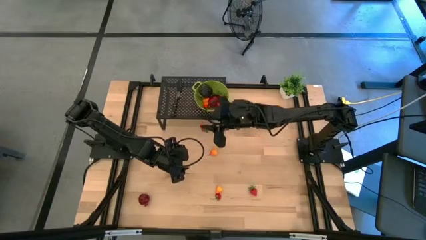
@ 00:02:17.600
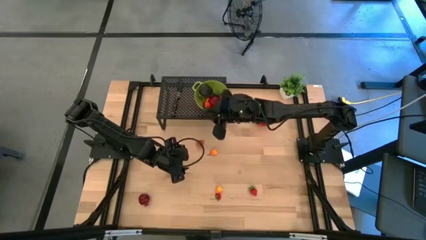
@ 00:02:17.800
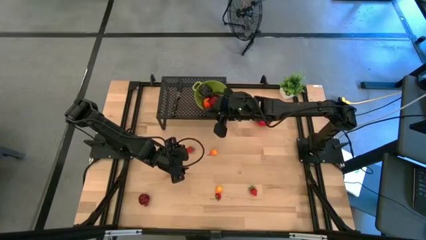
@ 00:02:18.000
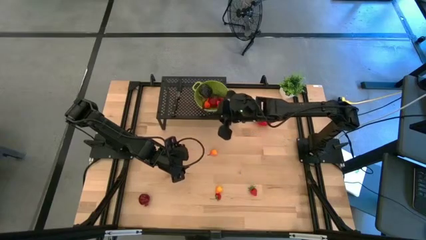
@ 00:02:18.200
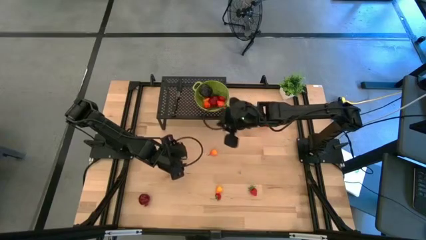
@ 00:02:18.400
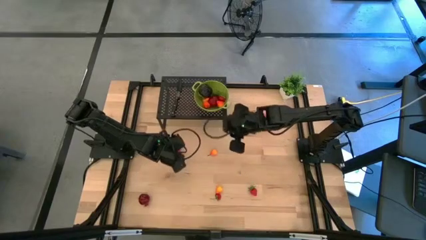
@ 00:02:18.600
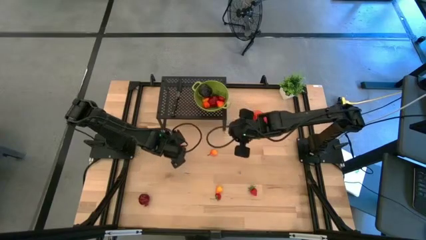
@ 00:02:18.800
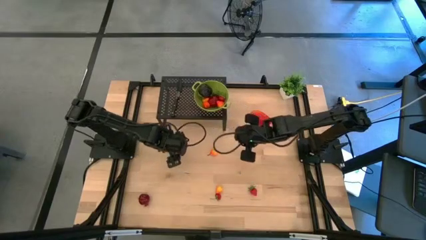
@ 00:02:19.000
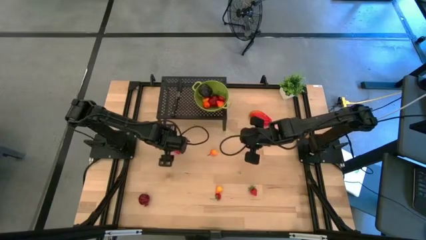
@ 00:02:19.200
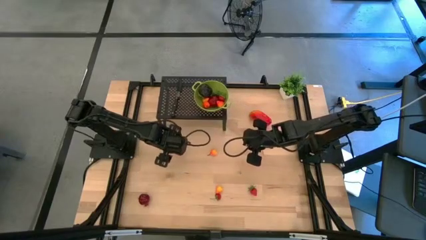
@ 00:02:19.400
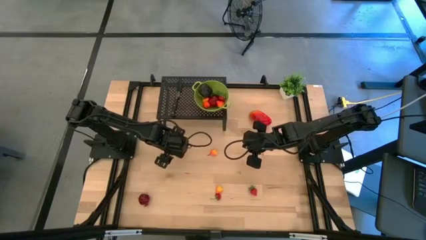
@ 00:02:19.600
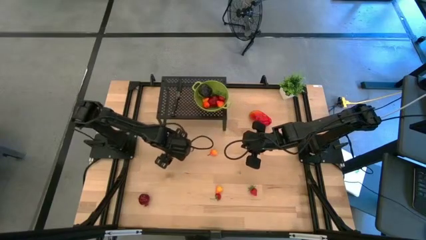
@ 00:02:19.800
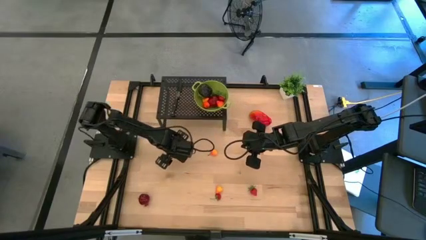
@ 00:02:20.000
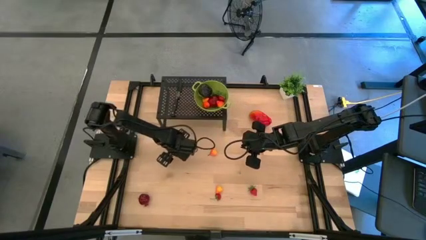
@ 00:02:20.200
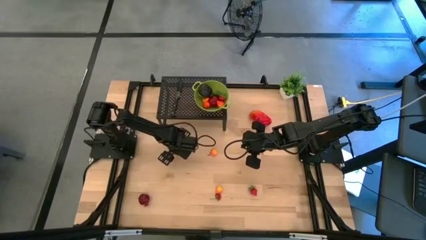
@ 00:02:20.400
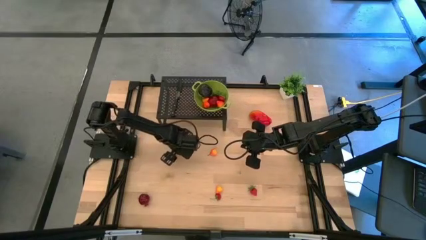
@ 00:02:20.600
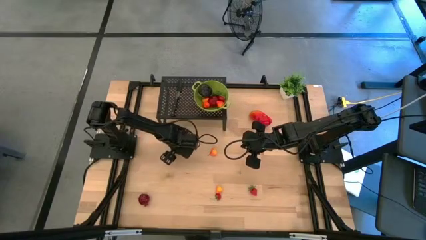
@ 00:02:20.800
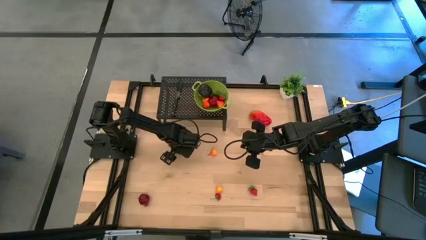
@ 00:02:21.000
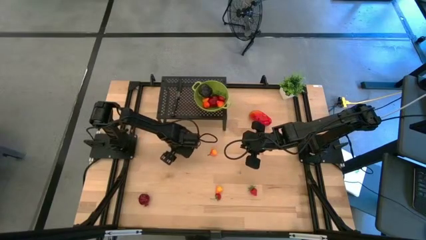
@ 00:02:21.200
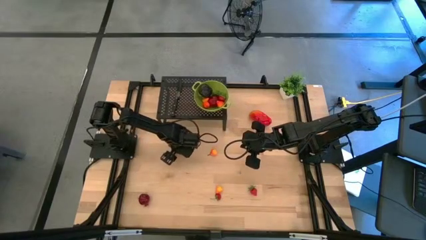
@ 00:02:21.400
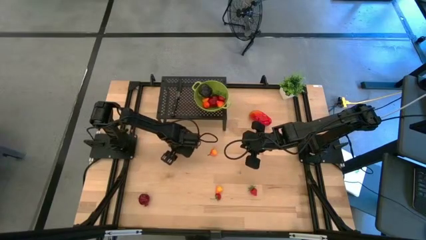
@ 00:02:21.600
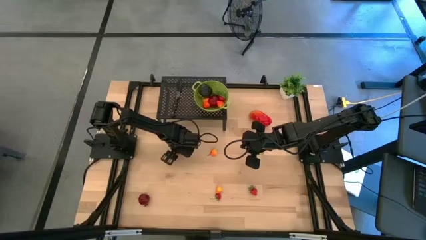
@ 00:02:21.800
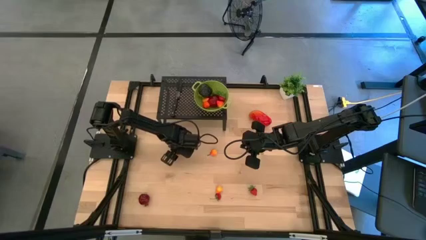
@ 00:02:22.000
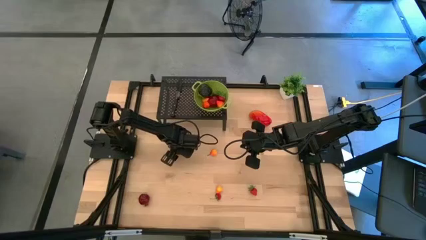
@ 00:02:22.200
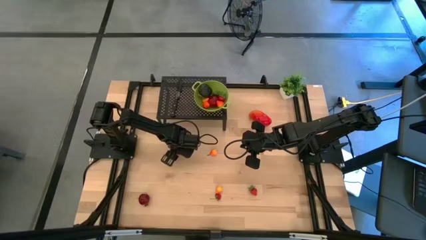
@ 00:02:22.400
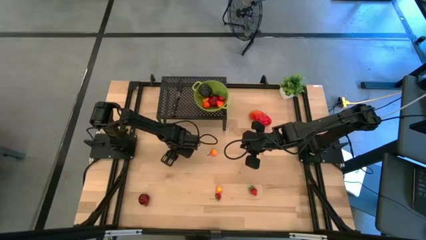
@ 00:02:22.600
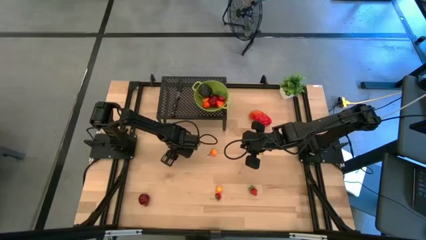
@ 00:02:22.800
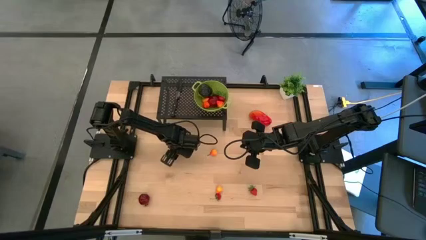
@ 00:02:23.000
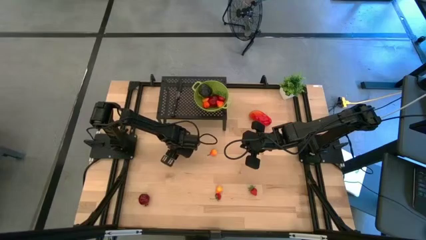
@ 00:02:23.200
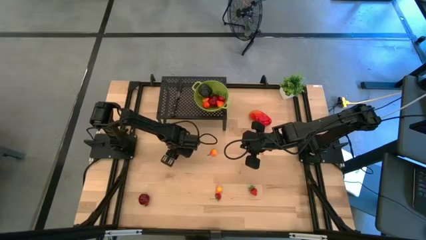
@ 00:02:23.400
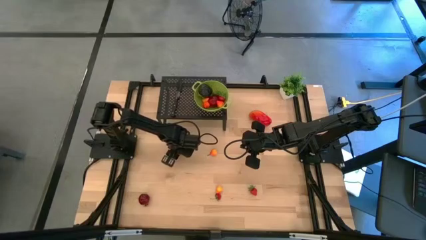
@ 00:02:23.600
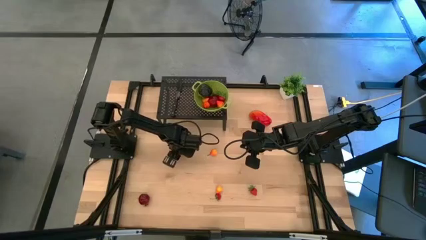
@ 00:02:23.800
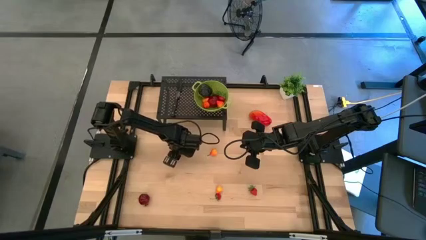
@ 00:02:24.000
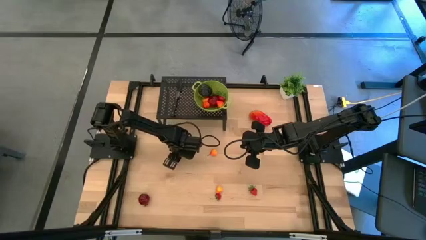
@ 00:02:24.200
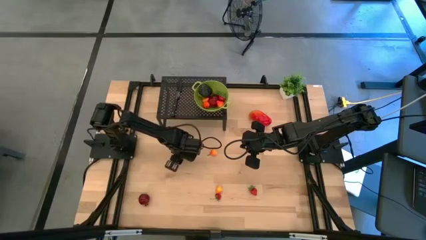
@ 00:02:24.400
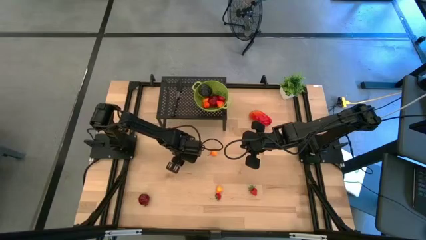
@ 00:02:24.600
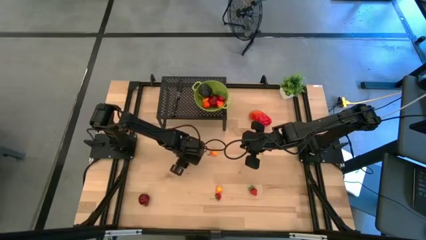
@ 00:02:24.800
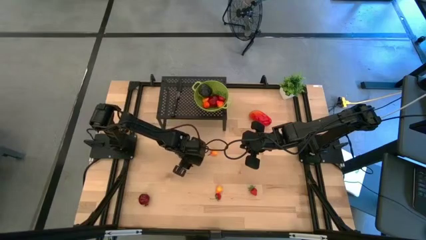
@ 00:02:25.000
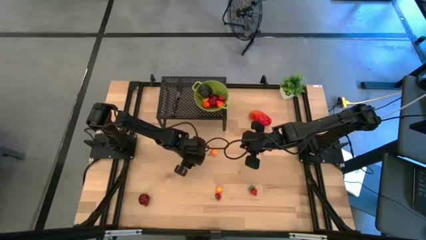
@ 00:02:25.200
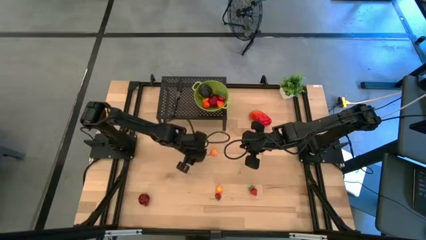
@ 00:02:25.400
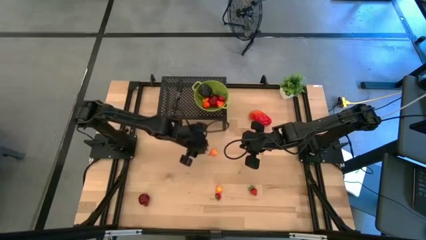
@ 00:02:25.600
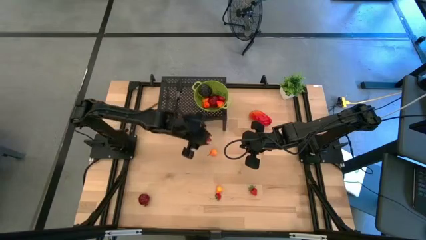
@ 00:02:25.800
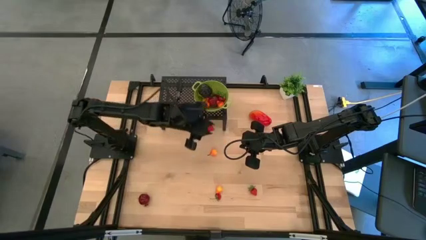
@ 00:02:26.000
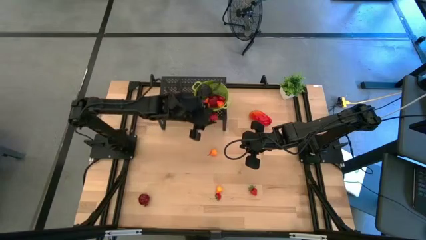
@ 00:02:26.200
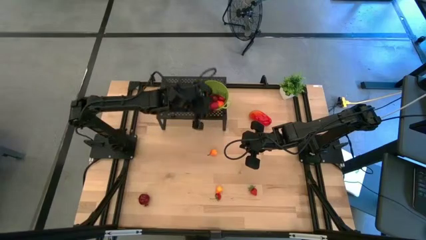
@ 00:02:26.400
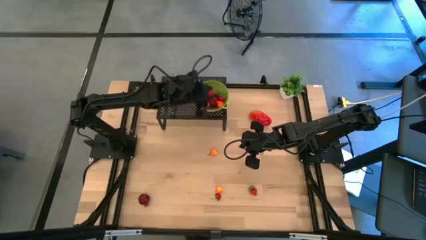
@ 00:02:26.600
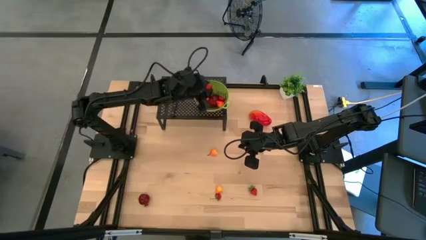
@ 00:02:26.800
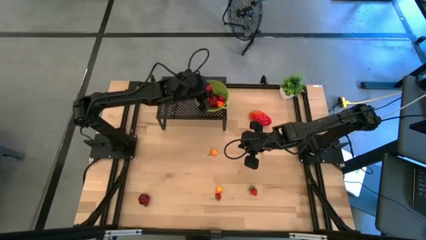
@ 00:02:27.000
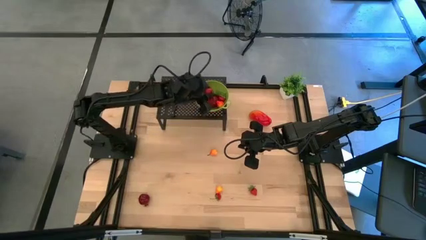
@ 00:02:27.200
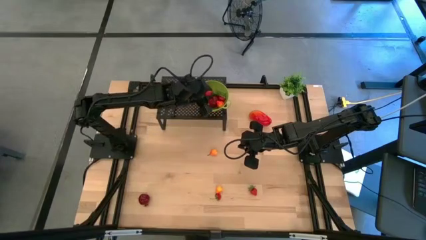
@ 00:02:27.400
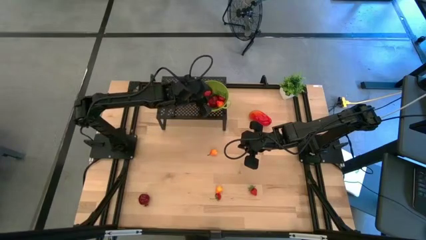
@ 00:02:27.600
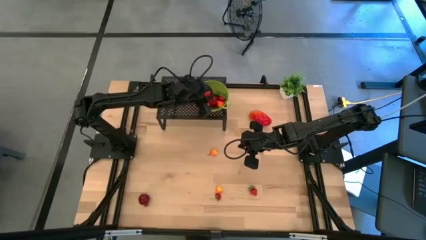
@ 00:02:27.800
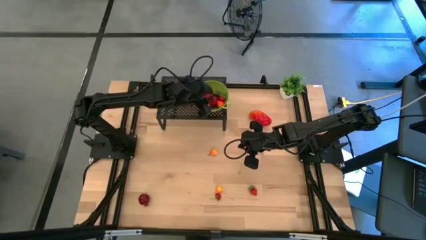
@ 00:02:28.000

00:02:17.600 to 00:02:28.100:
Task: Pick & Place Fruit
Put the strawberry into the green strainer bowl on the shelf

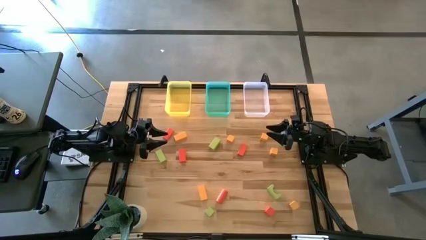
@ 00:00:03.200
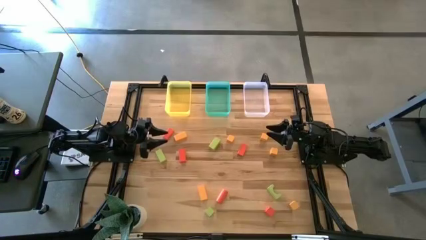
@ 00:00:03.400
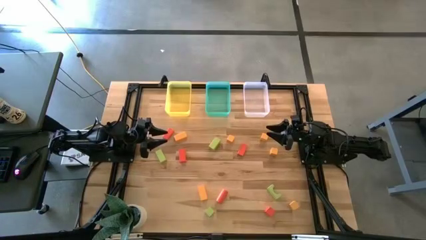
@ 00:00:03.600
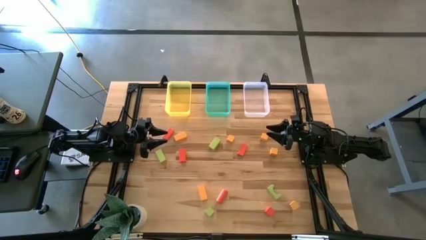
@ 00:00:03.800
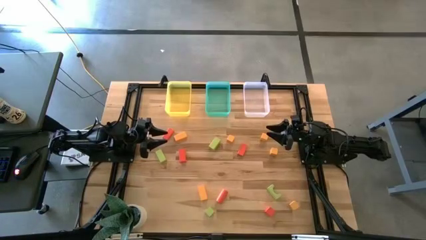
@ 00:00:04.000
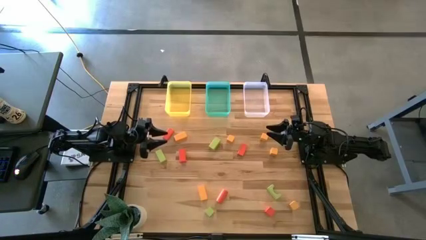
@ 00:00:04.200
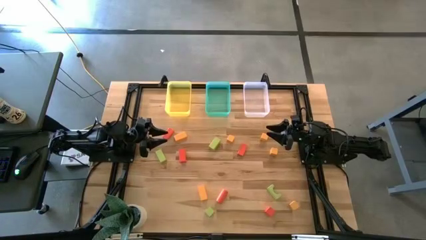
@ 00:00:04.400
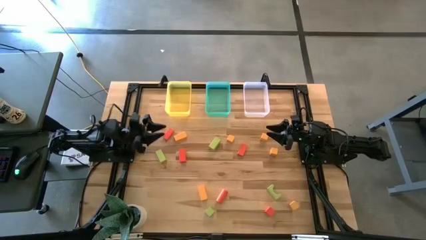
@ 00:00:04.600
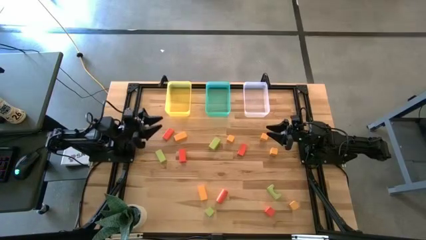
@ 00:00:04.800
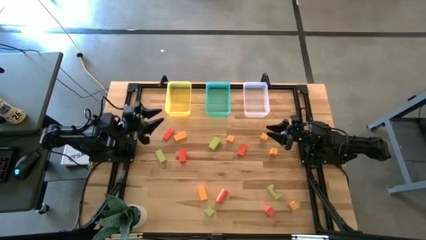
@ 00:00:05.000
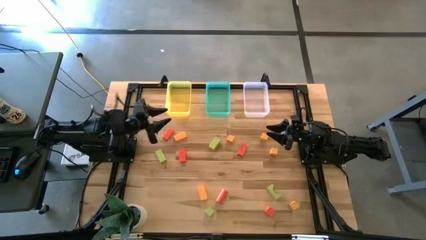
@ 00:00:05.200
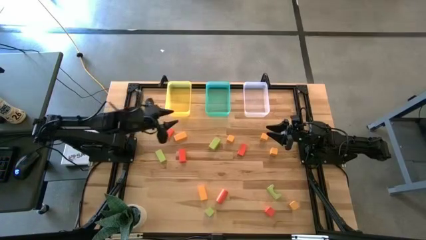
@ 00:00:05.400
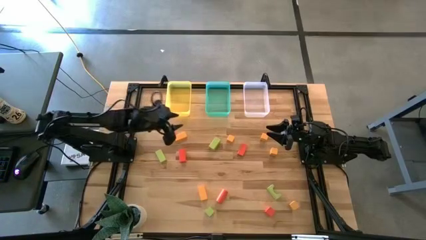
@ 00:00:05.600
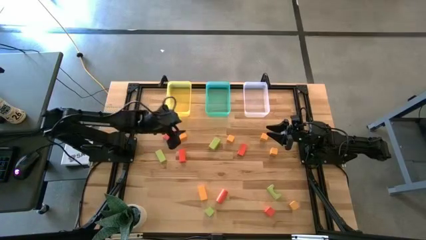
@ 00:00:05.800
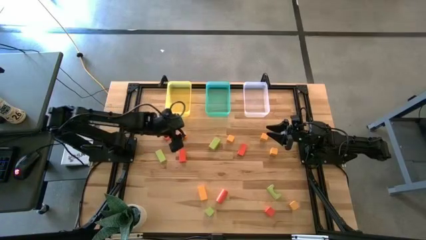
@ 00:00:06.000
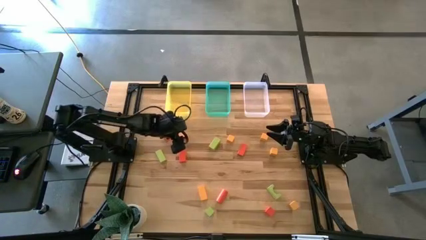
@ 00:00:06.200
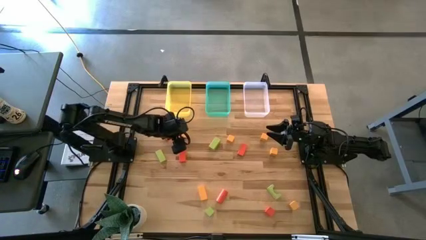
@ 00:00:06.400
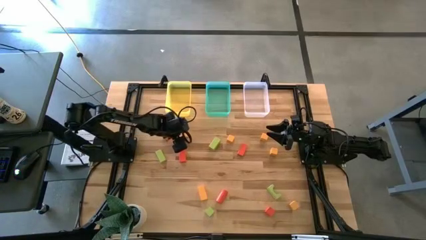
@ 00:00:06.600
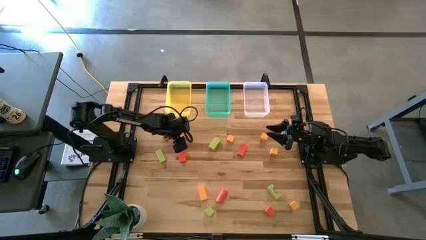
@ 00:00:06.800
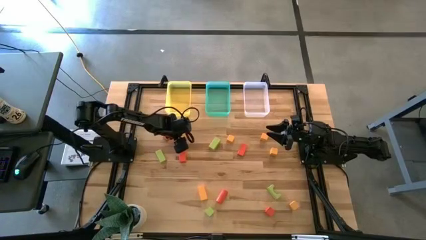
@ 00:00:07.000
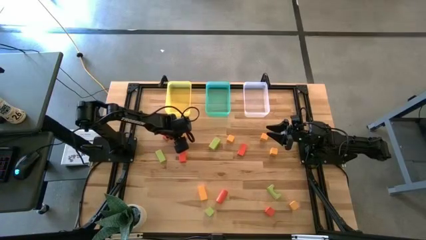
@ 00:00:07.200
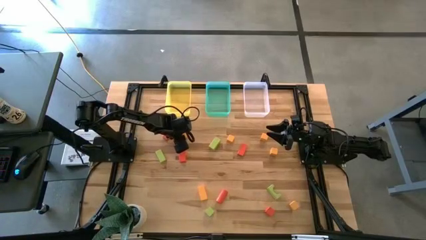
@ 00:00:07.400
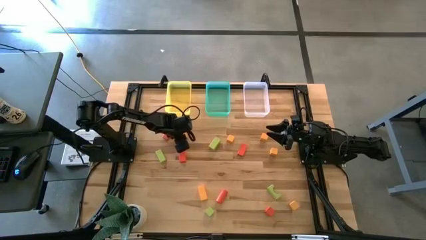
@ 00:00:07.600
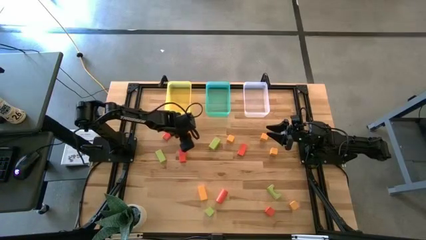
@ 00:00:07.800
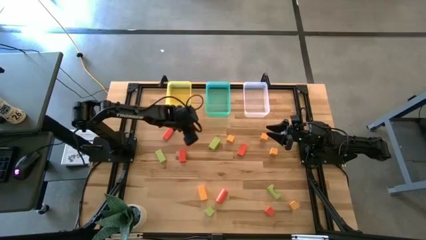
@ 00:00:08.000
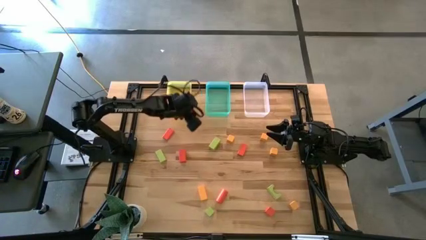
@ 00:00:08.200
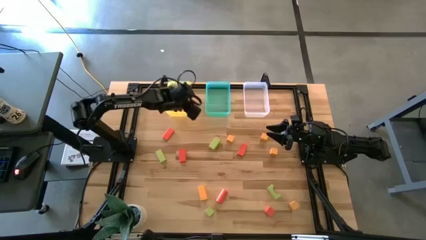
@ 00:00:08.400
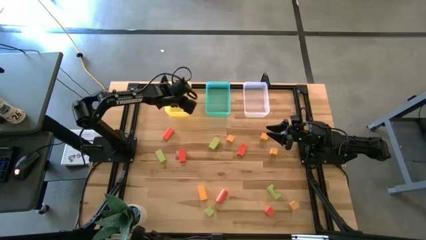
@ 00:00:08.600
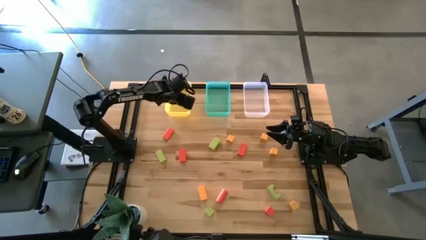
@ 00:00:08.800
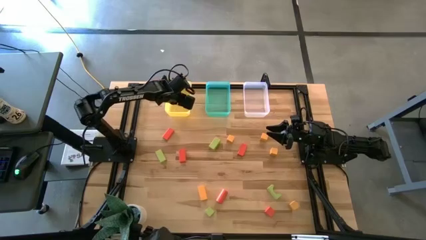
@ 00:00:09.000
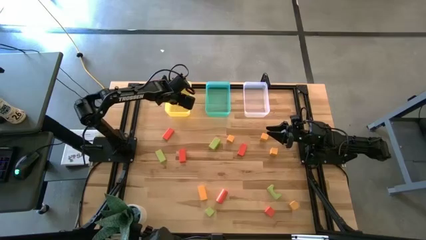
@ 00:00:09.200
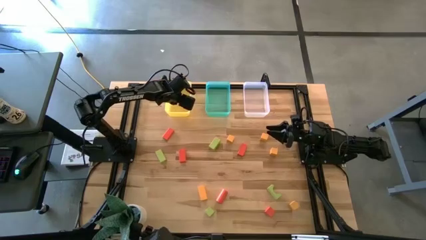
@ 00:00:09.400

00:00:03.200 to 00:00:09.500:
Task: Sort & place blocks by color
Put the yellow block into the yellow bin
